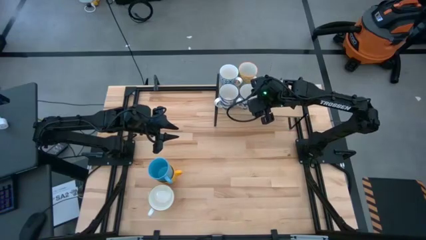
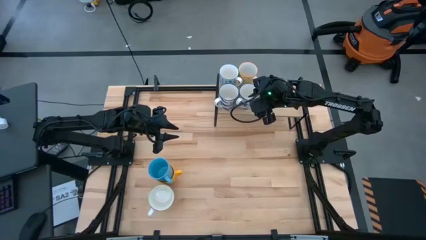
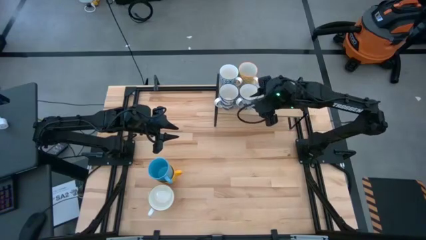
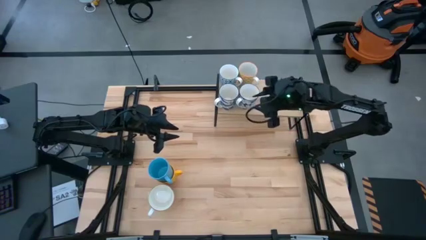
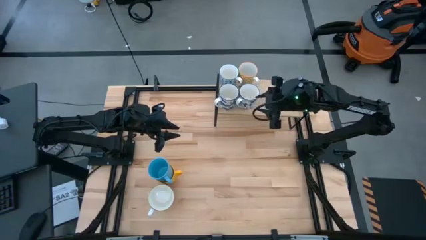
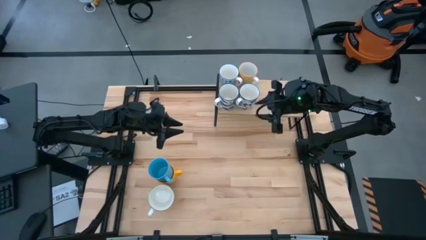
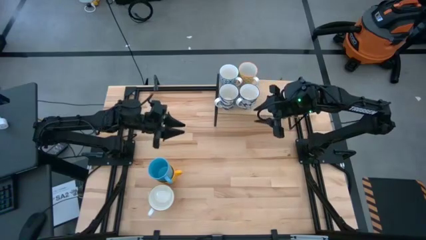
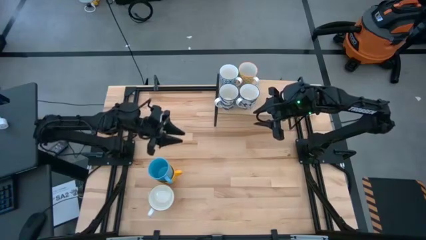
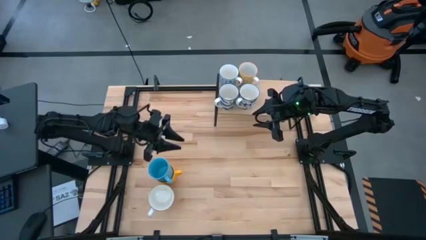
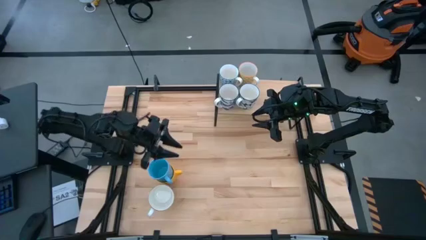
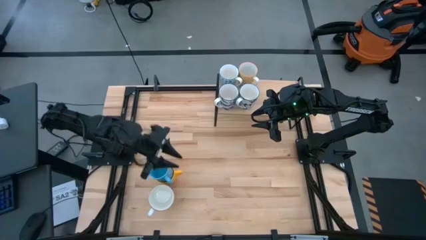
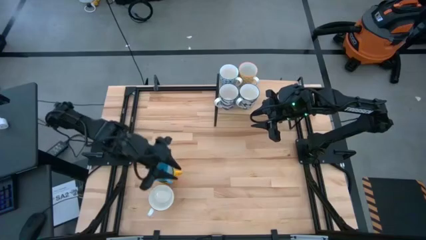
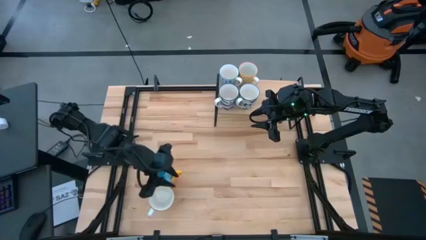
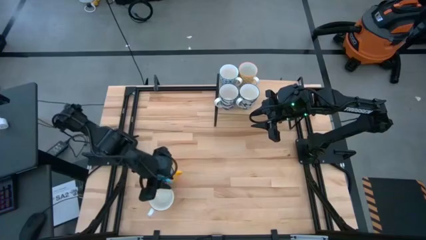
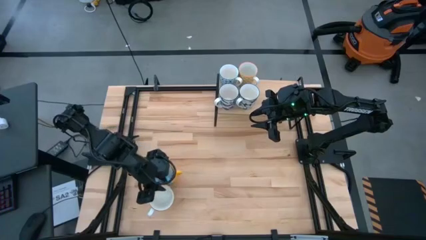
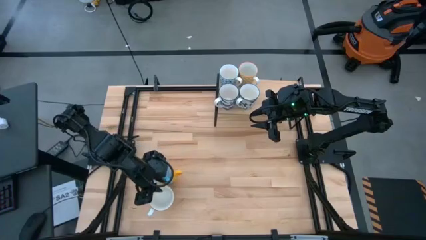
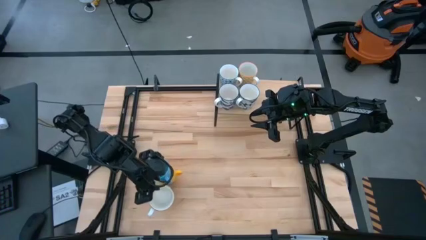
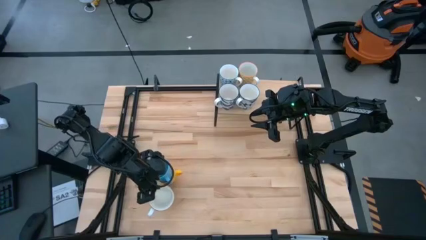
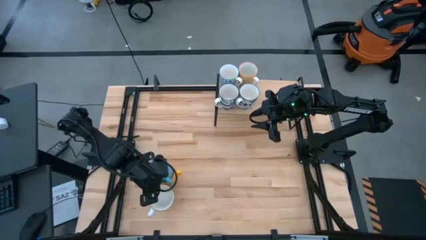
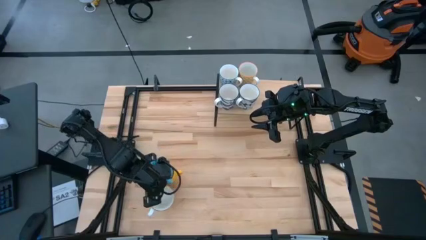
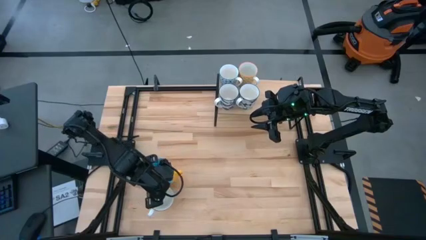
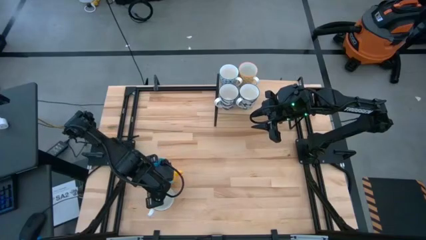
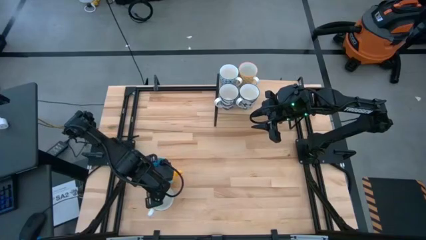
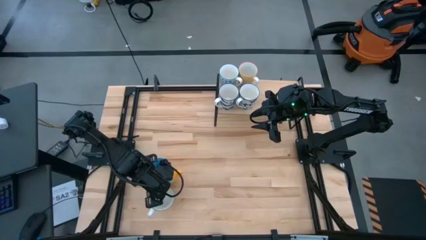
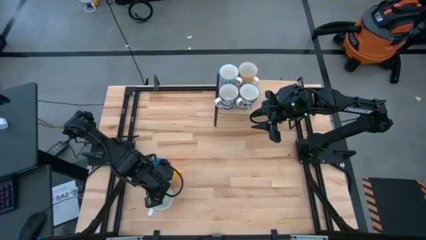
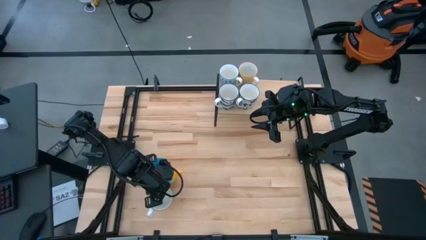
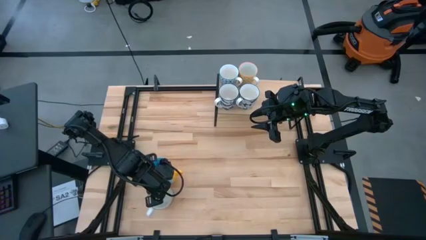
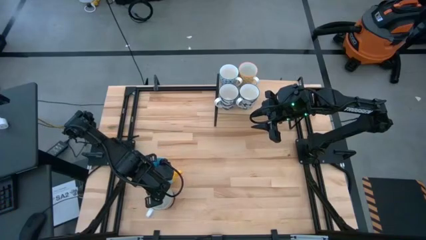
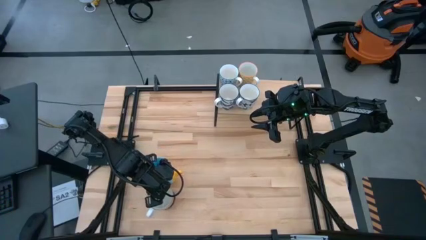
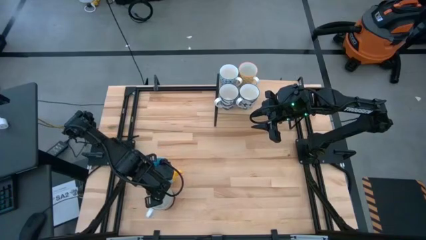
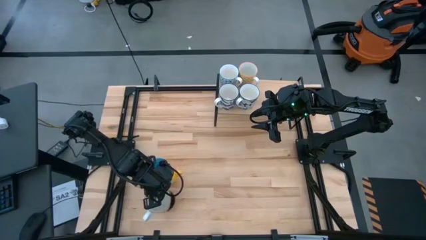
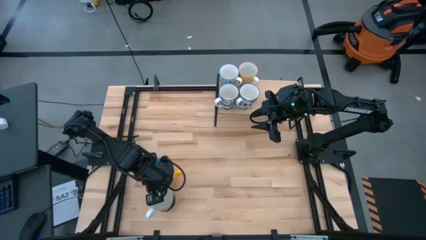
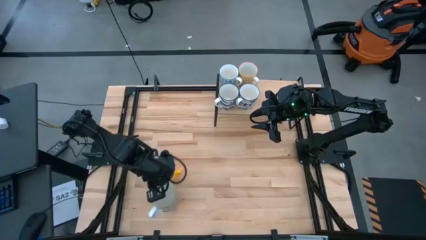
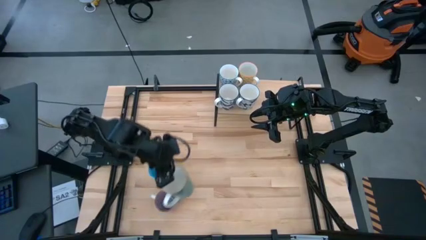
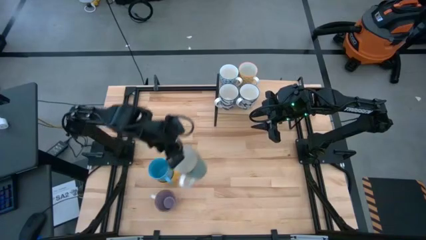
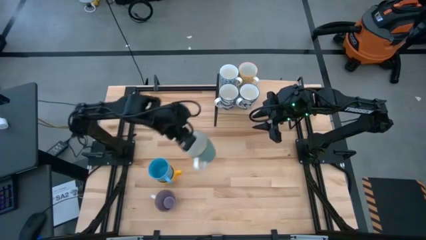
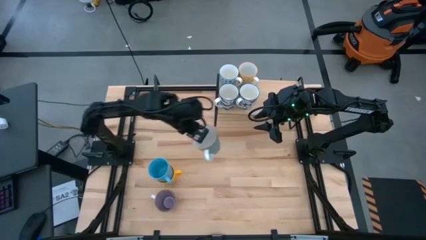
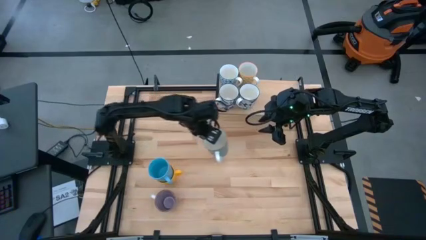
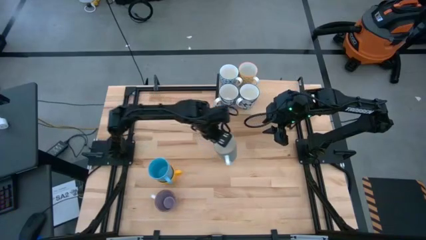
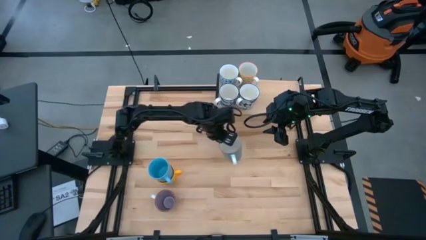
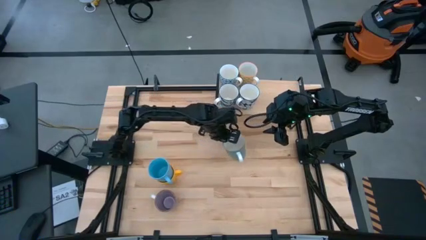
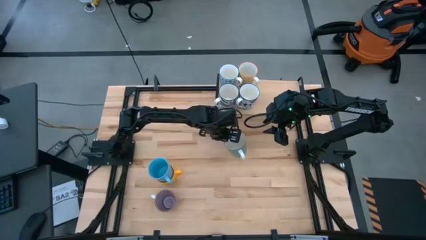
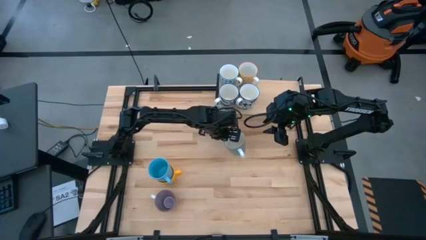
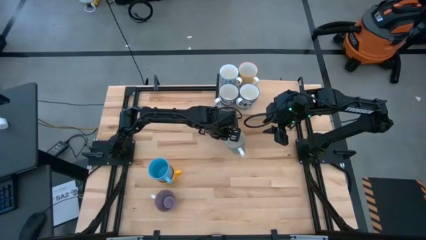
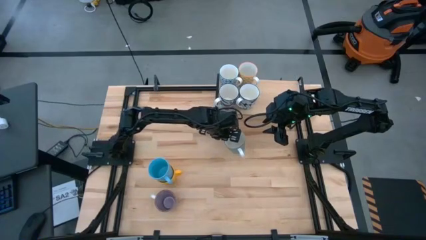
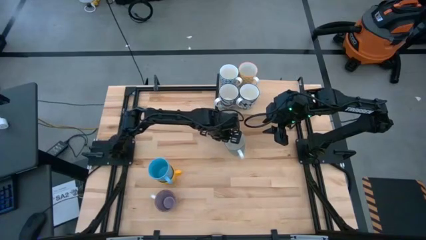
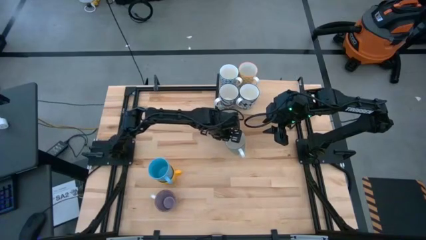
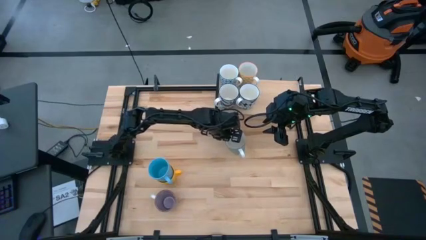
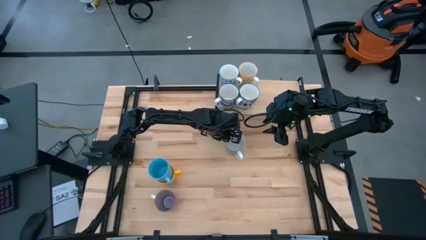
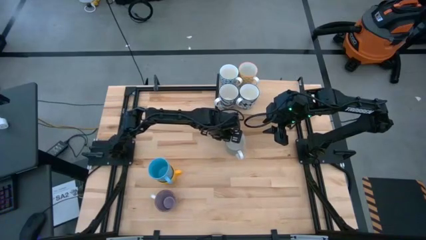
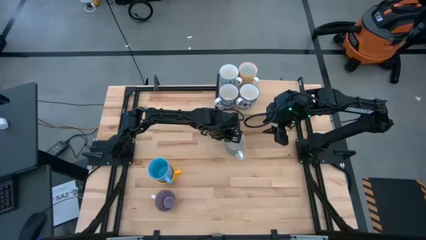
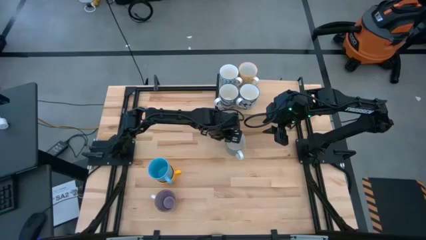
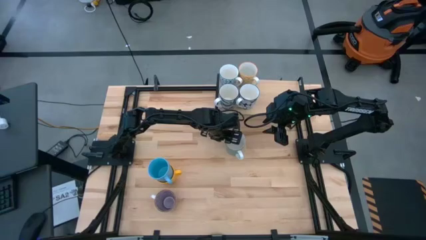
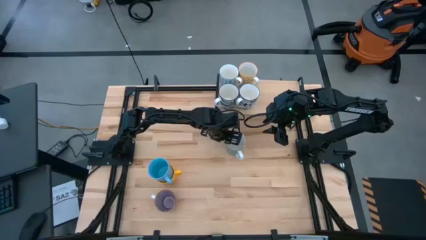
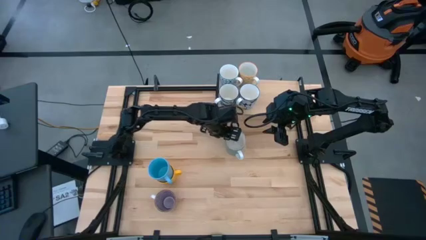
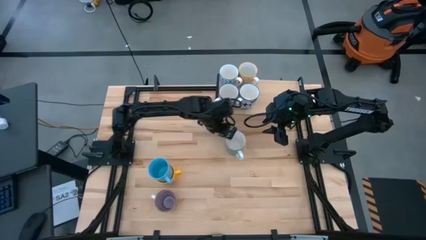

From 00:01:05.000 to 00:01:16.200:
Task: Place coffee mugs
Put the blue mug on the shelf

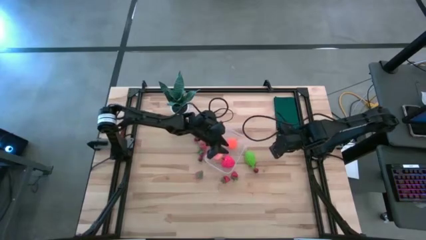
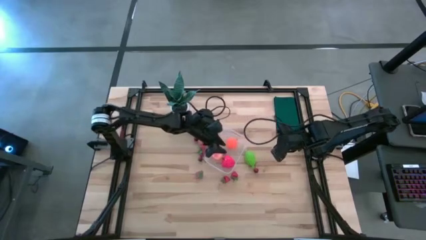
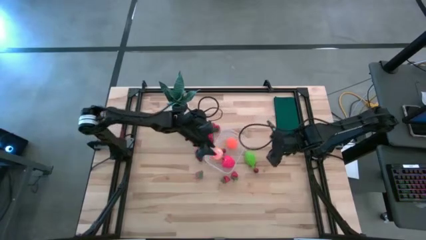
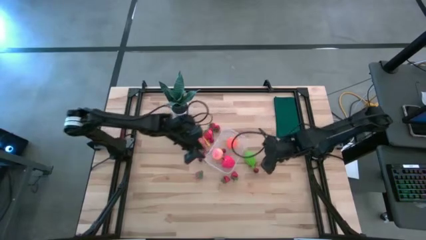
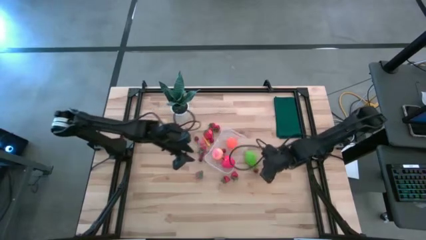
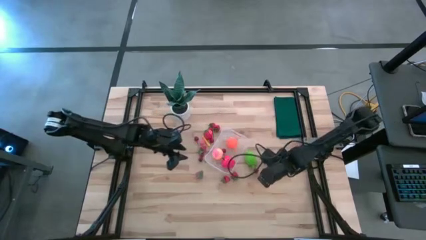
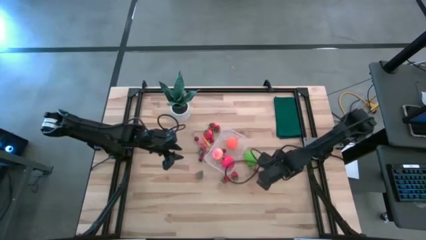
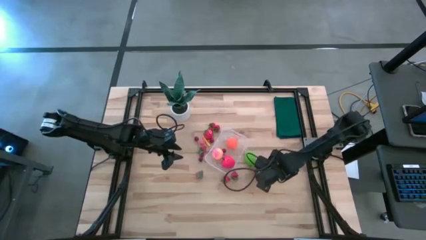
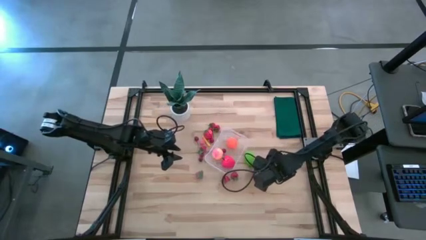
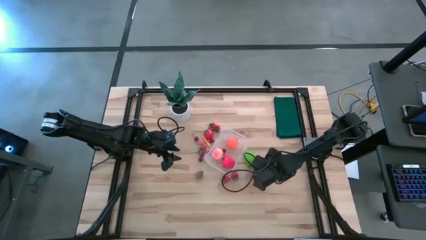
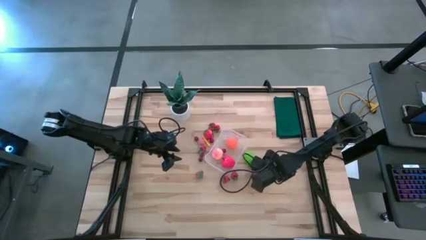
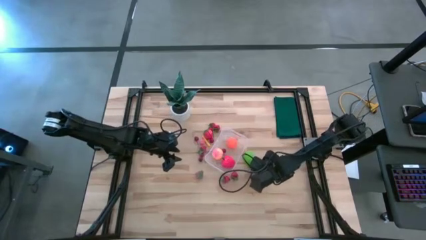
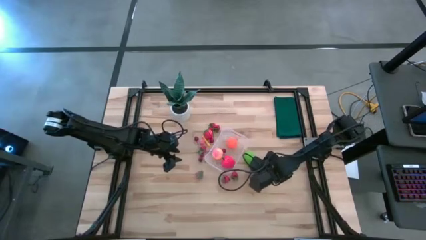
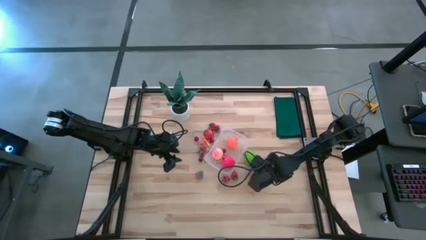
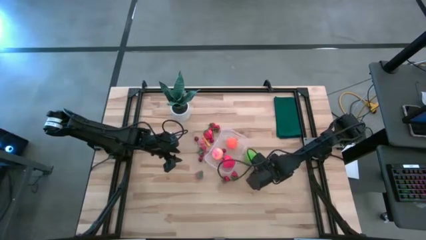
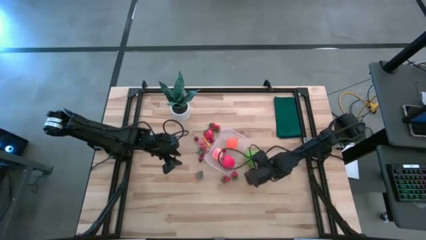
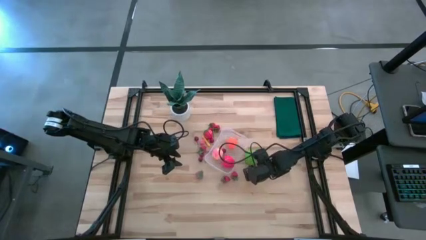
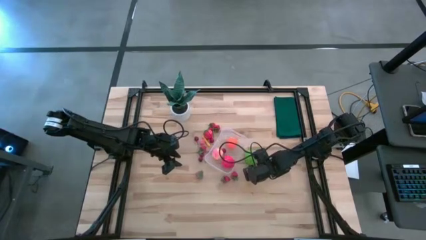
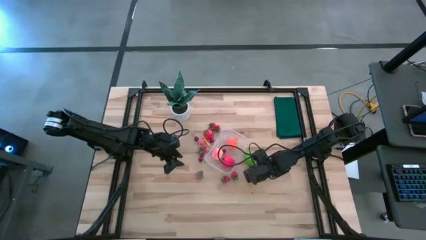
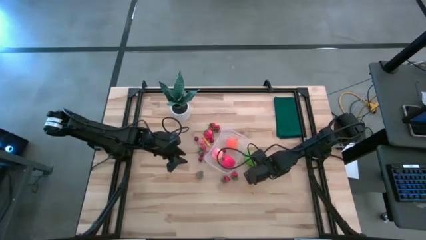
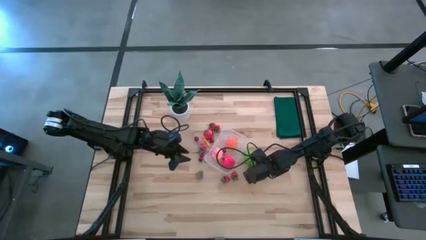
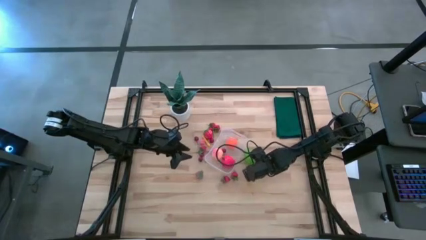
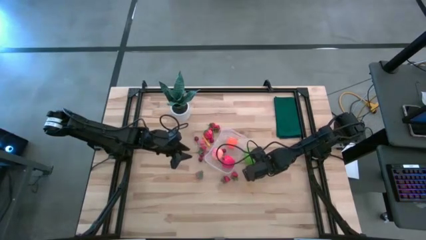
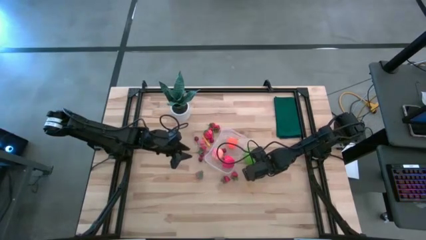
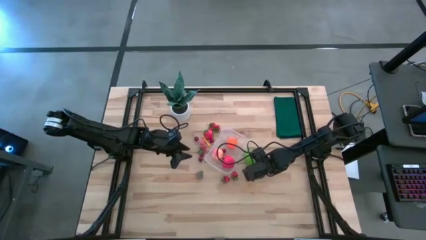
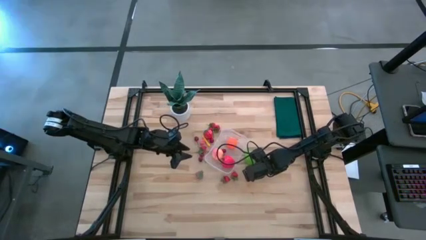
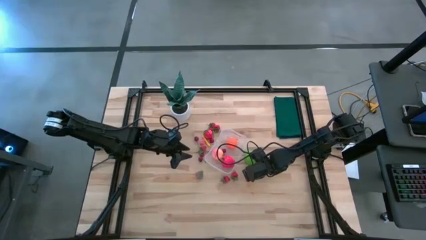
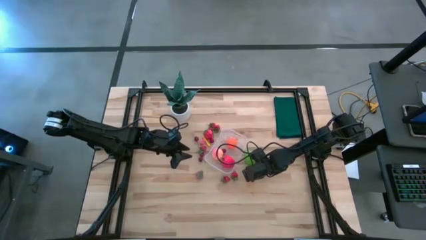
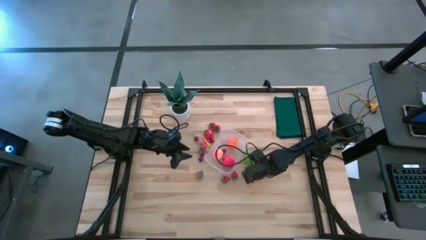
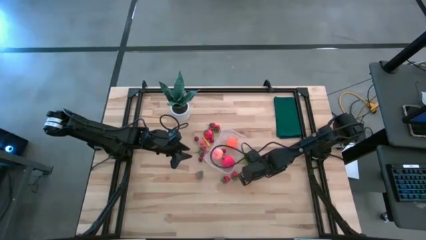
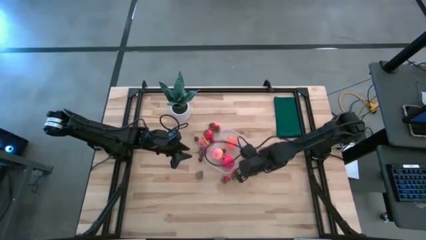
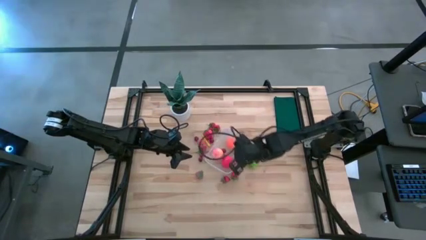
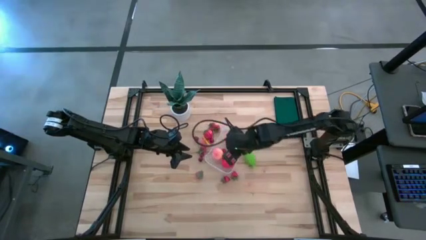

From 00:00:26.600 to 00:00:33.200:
Task: Pick and placing Produce into tupperware
Put the red cherry into the container
